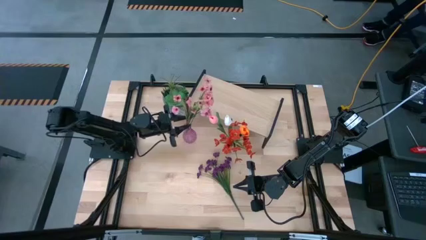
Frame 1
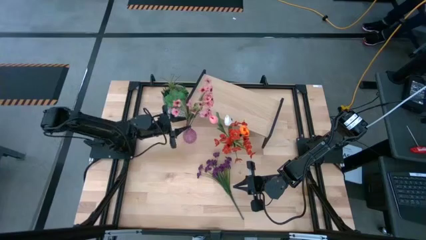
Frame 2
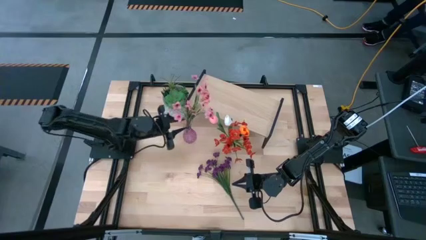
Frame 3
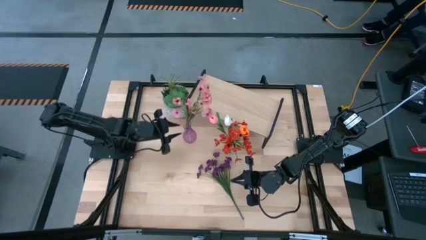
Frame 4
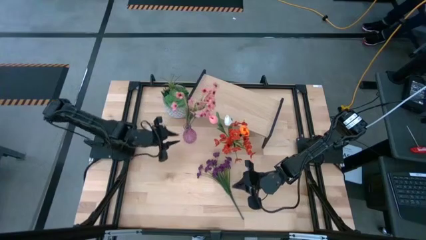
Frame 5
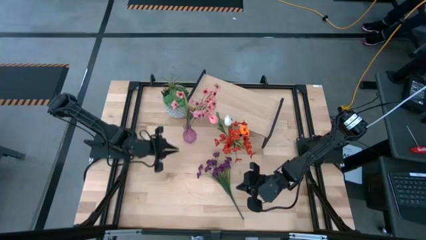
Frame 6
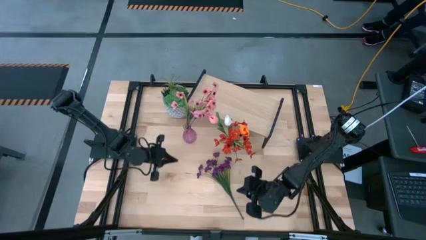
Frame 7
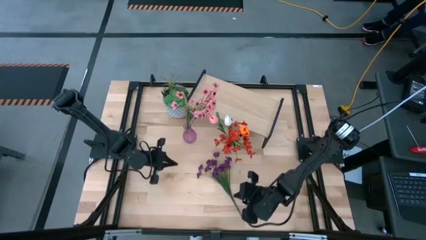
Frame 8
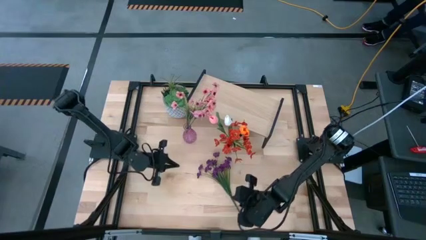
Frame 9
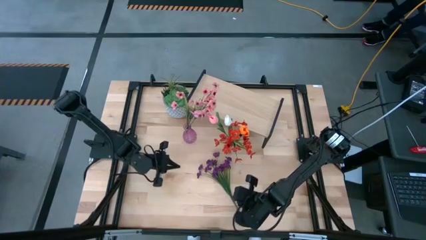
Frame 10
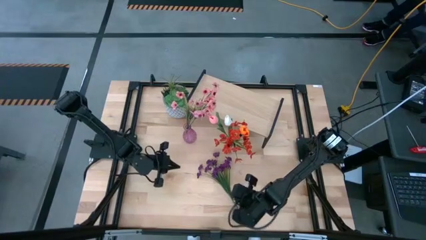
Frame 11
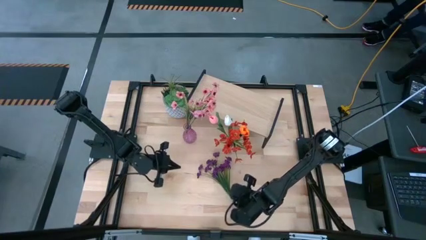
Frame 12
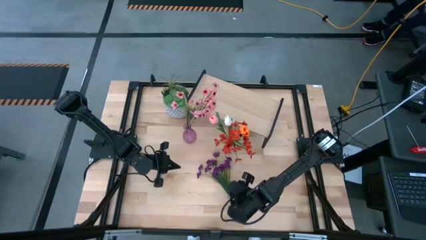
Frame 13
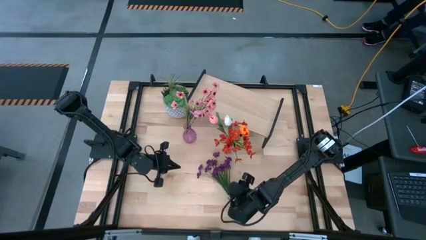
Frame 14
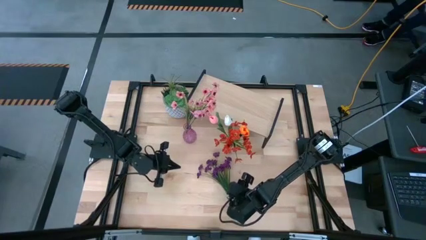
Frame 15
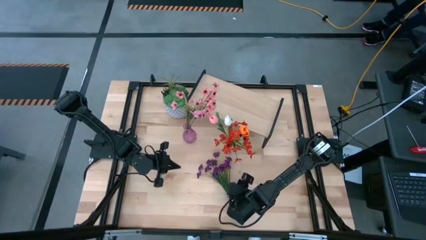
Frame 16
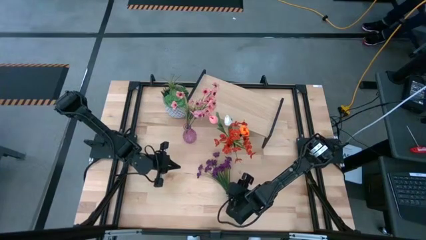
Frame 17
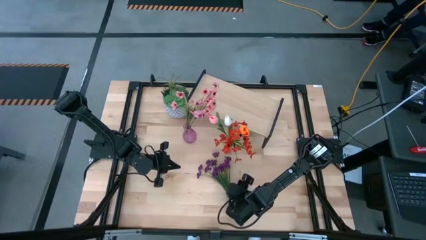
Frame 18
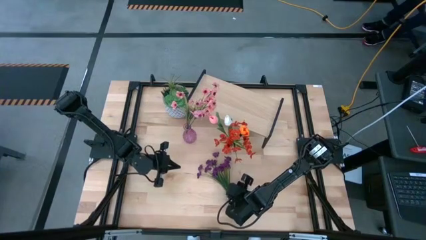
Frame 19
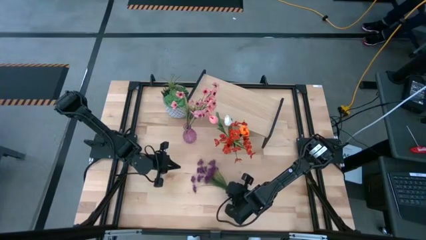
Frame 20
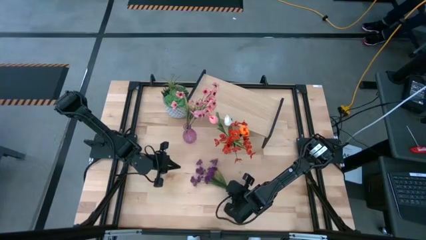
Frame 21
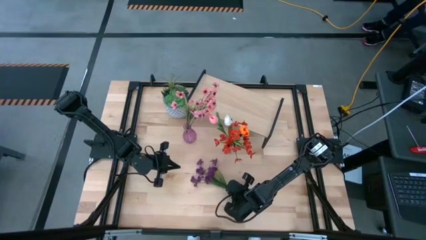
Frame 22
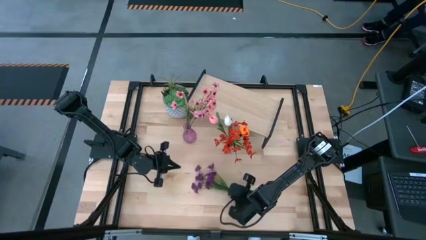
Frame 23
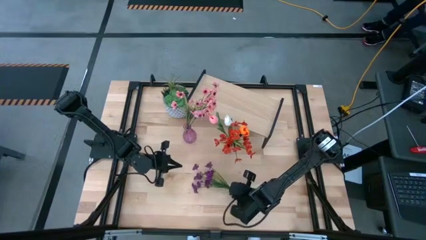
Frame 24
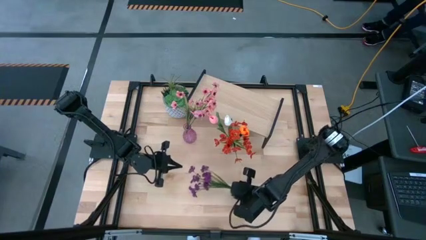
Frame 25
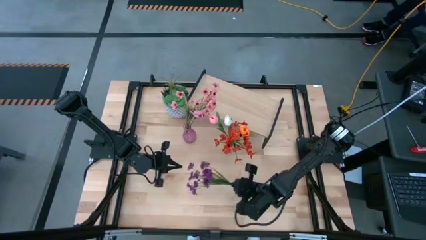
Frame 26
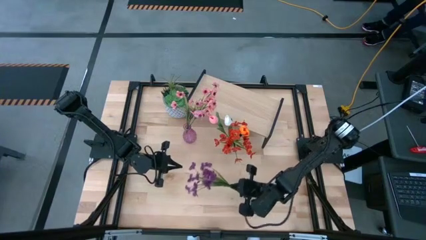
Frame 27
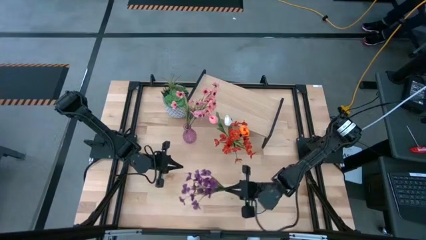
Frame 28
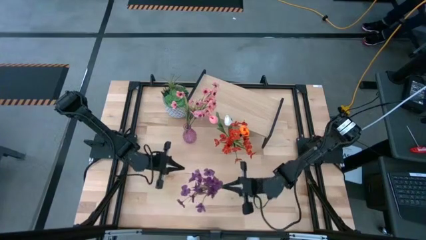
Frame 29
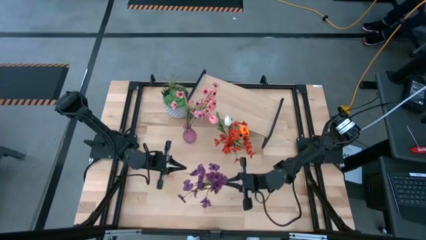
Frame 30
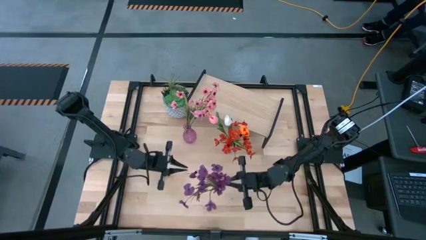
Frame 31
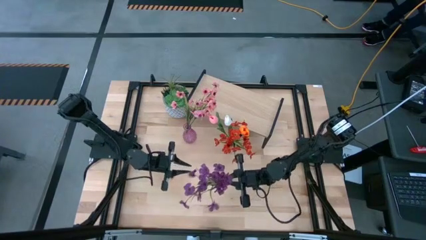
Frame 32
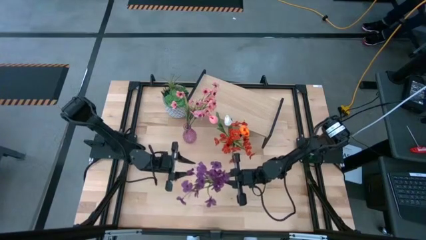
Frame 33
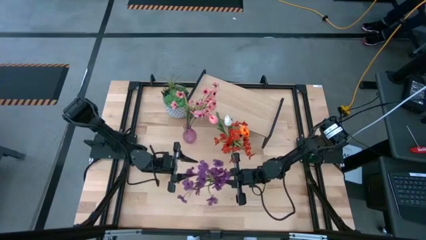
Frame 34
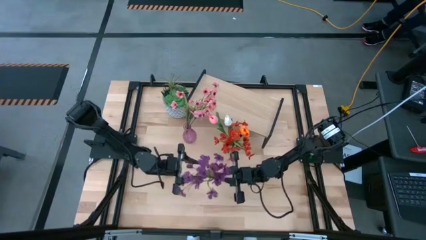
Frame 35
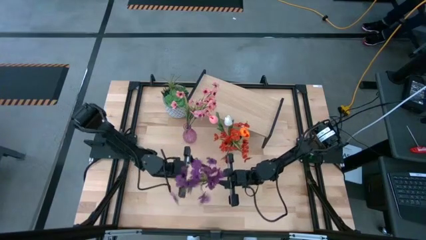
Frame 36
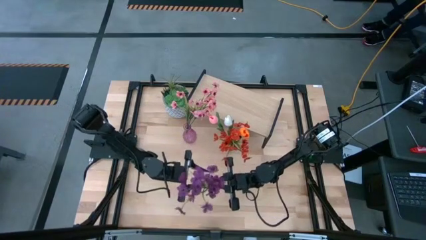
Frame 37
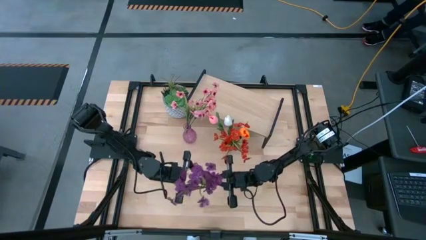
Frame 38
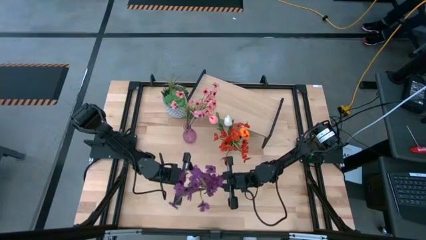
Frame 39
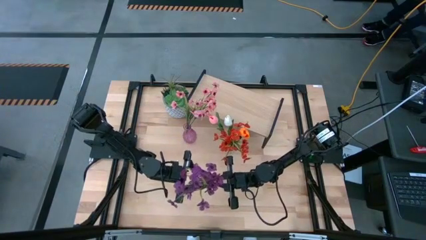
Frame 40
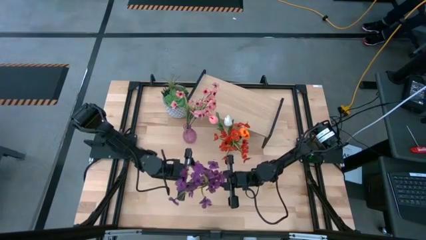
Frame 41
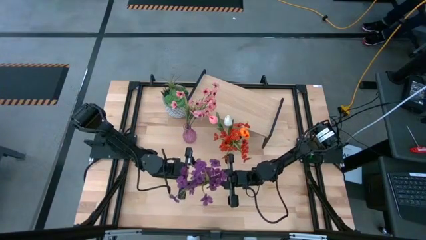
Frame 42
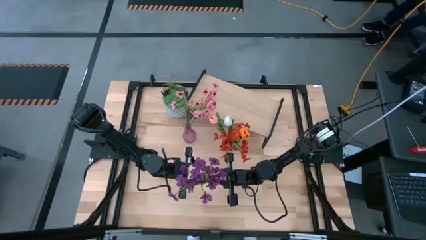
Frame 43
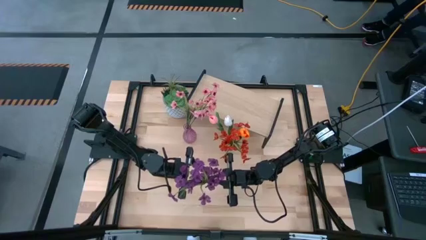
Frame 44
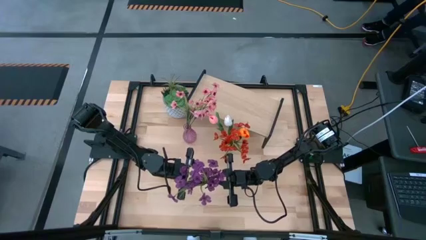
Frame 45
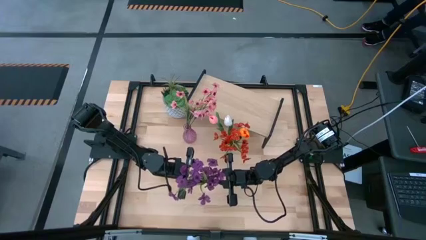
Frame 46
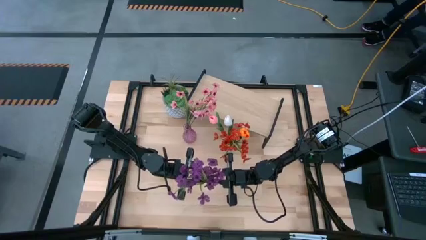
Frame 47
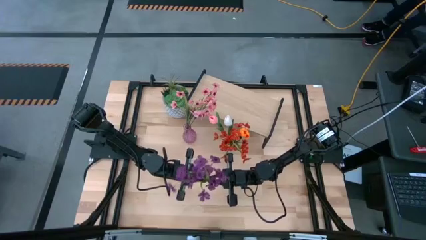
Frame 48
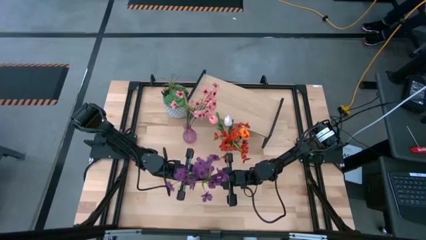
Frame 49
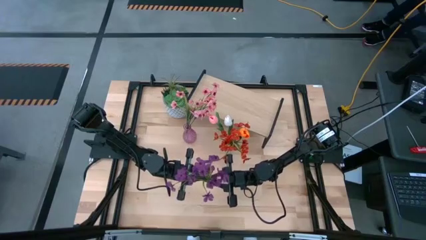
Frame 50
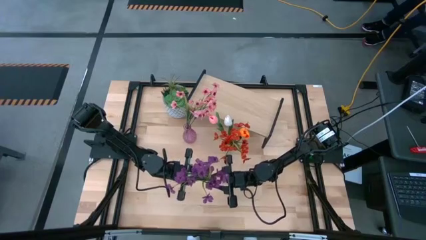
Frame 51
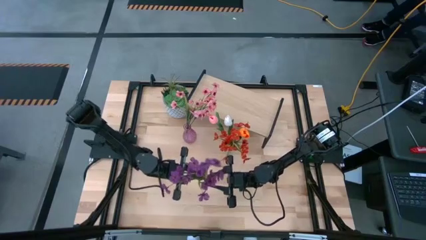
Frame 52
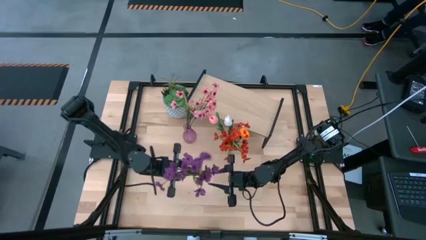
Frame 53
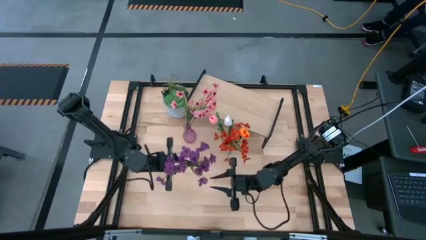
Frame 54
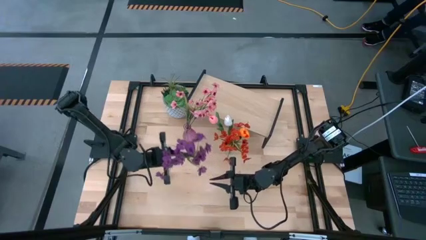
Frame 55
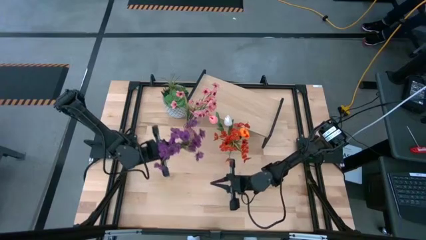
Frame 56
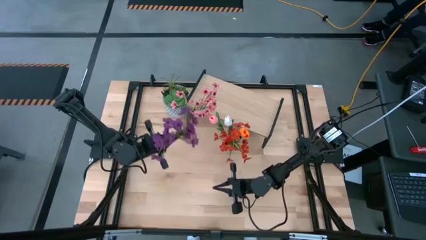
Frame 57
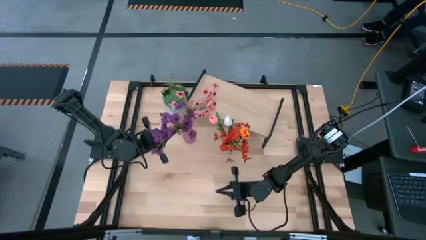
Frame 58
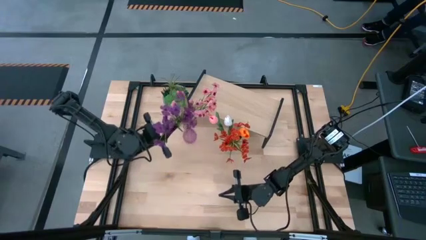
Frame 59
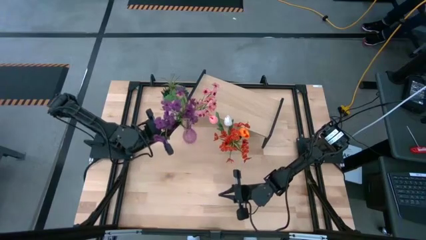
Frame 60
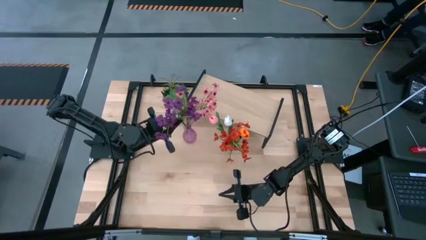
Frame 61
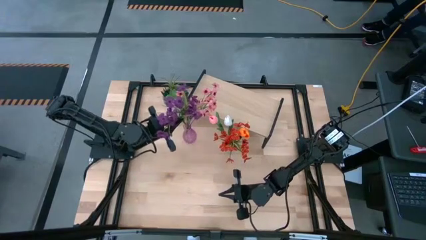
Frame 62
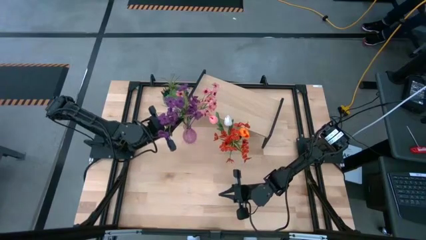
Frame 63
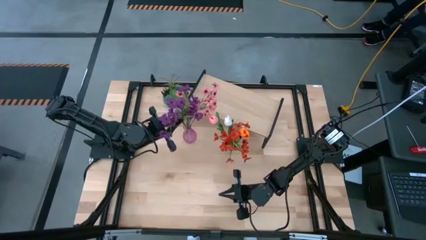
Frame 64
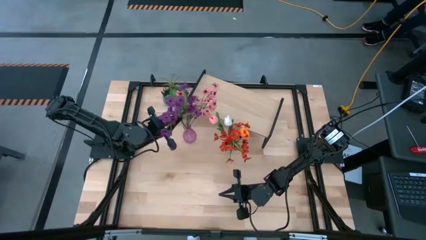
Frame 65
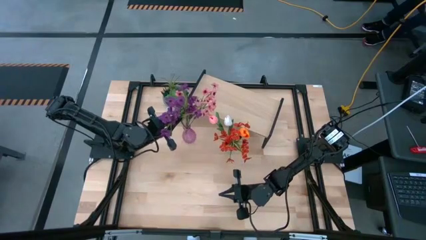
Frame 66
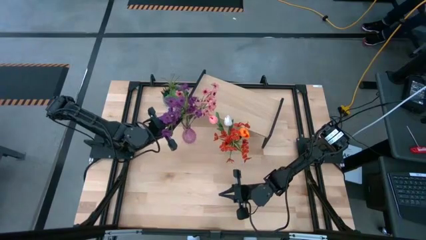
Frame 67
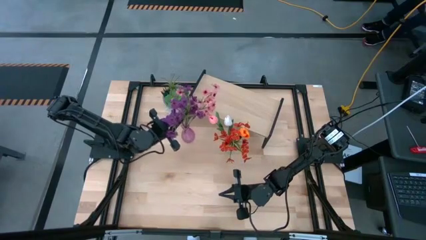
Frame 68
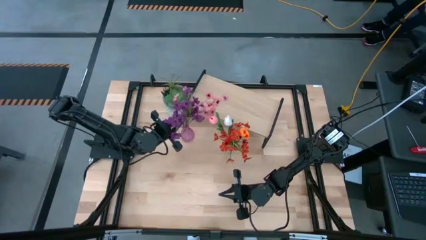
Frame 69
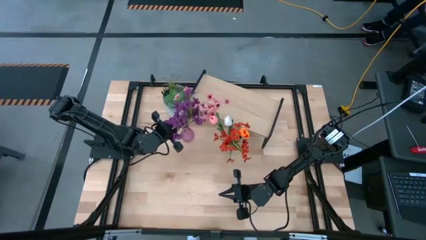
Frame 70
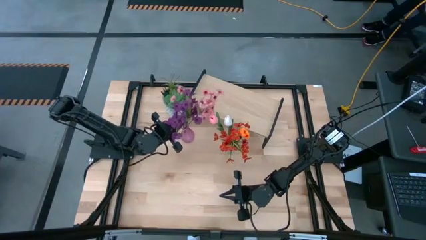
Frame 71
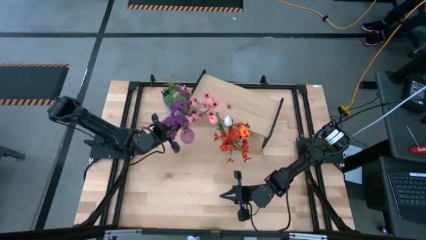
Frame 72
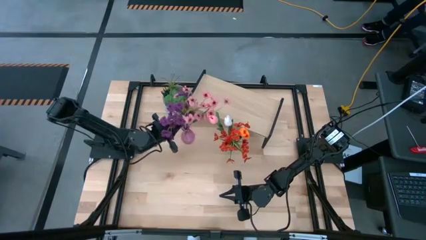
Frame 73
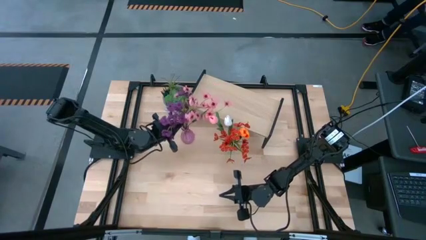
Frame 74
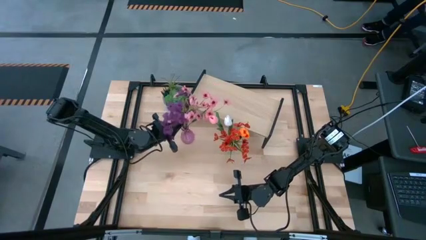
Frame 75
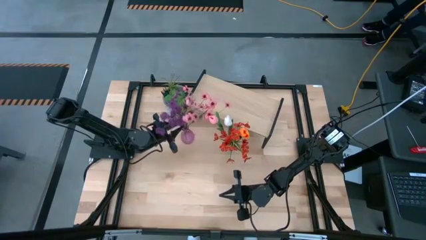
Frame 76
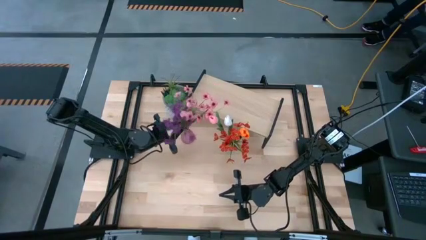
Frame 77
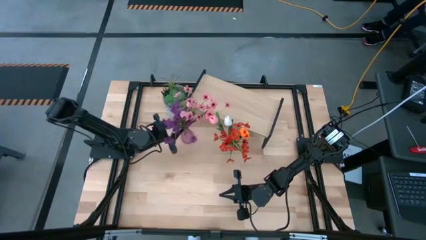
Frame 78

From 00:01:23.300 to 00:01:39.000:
Task: Pick and place flowers into a vace then onto a shelf
Put the purple flowers into the pink vase
